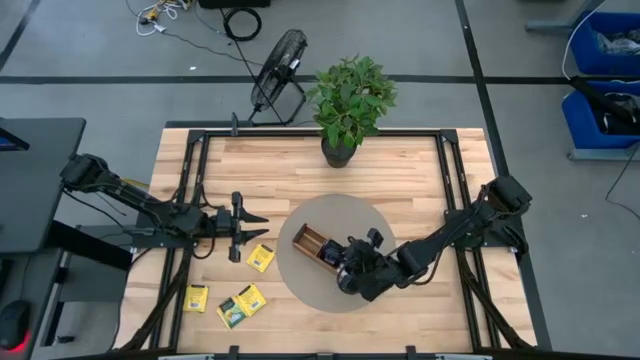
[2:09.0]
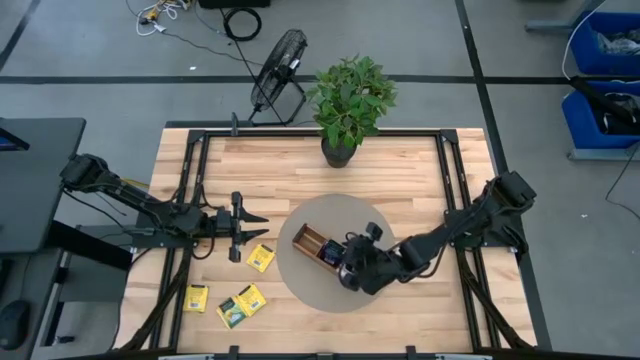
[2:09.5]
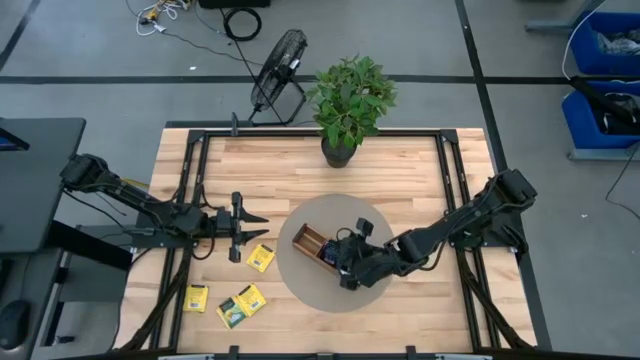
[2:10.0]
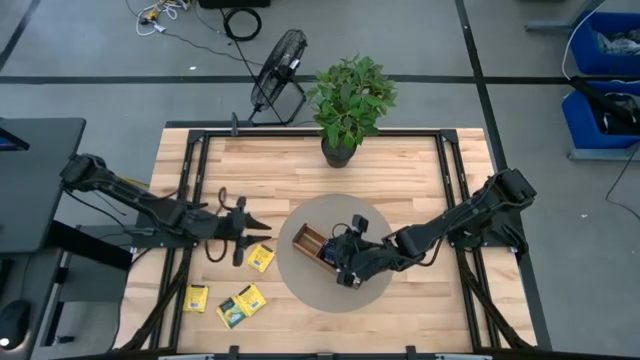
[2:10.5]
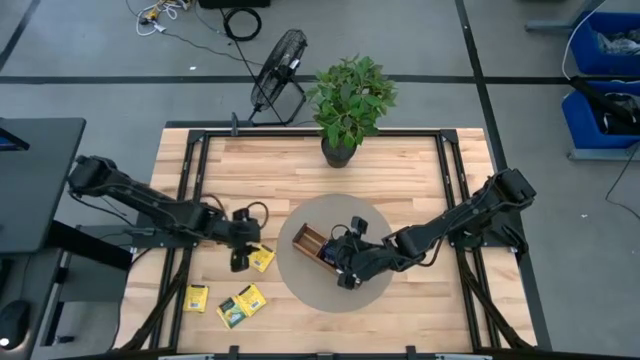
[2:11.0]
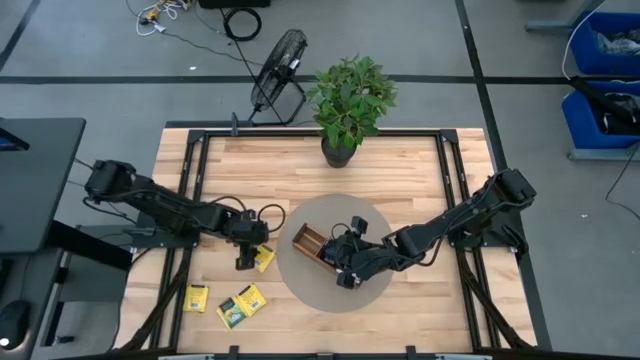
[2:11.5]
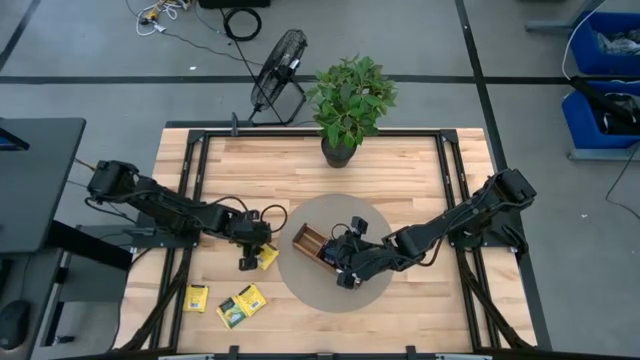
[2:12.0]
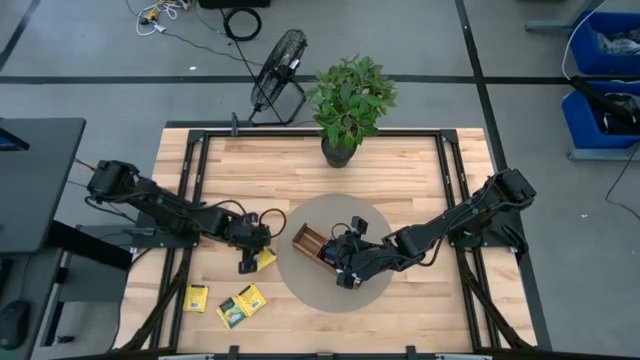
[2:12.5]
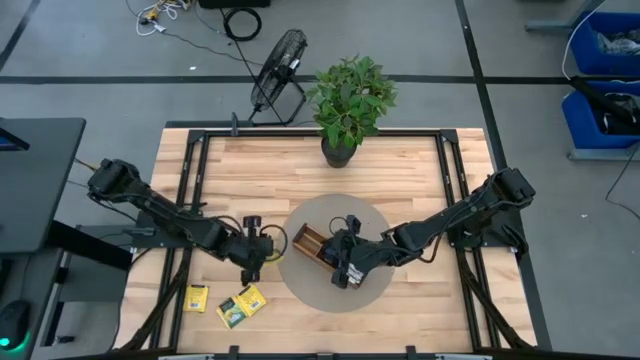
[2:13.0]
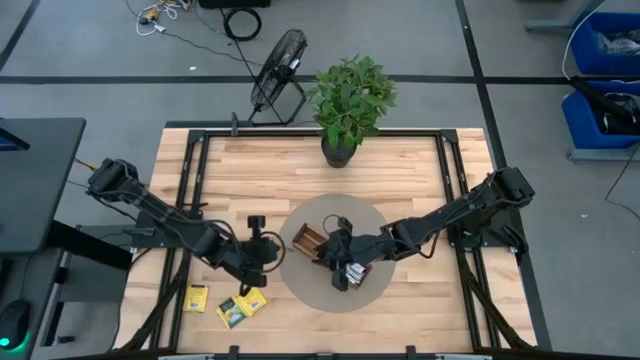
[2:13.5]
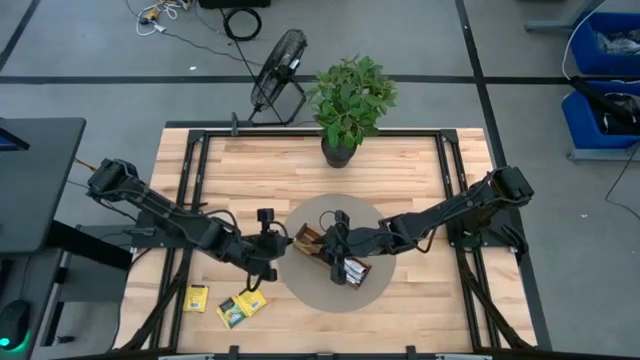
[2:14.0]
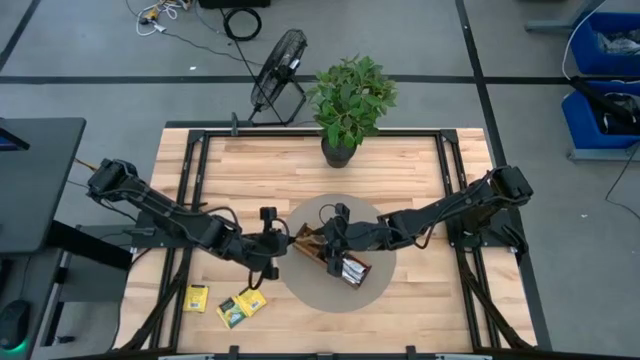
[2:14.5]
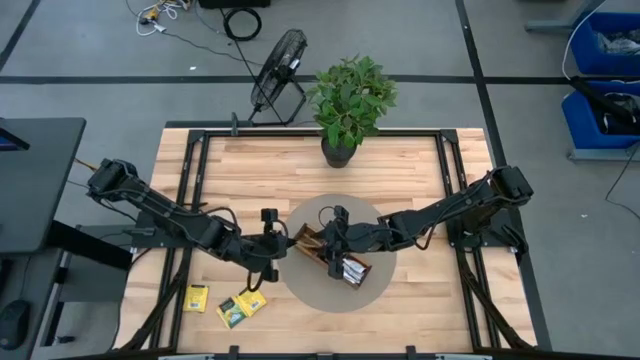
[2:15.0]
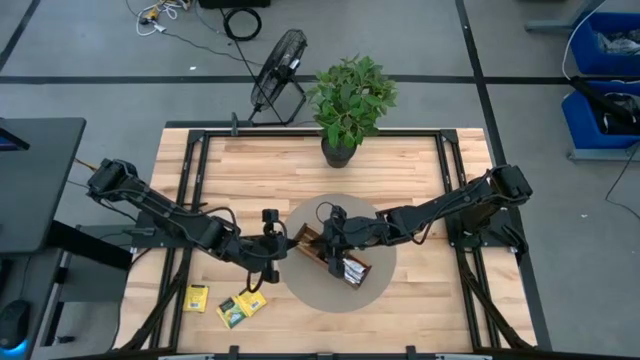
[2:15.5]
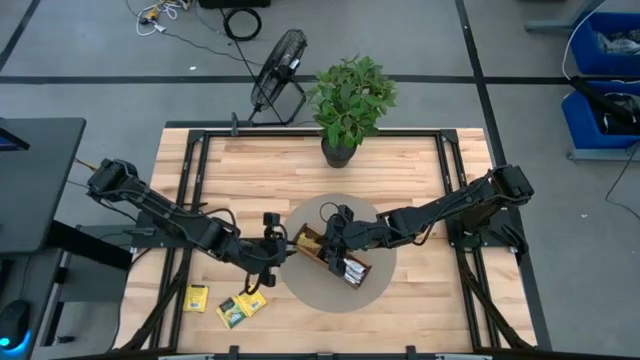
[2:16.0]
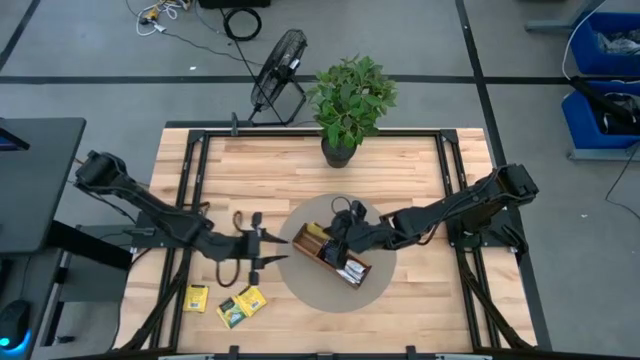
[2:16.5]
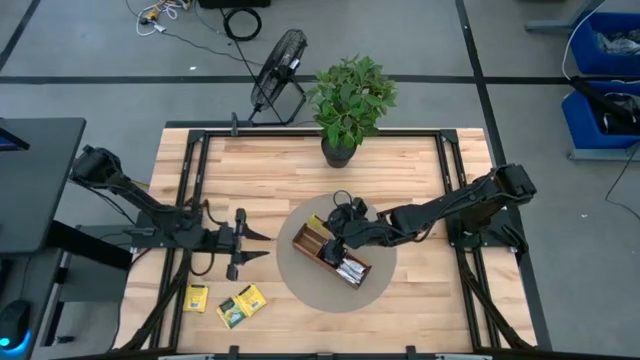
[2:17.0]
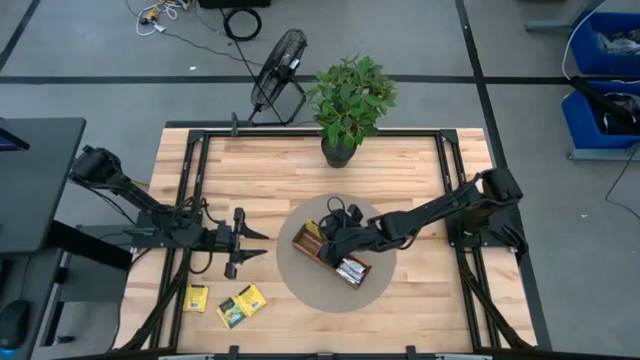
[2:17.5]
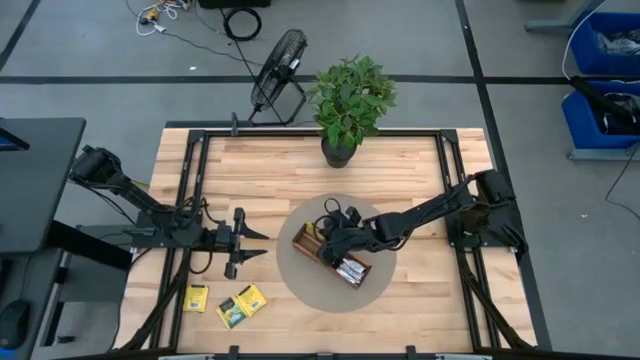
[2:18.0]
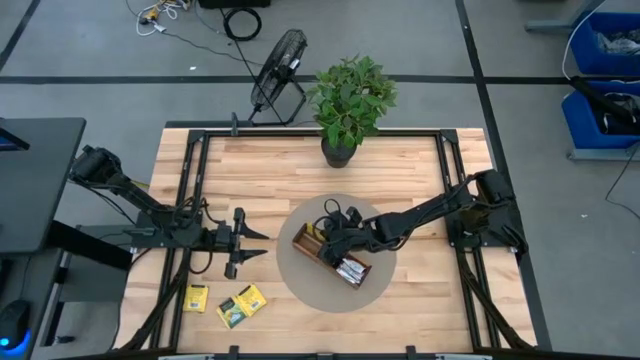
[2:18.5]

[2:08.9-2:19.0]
Task: Pick & Place Tea
Put the yellow tea bag into the top section of the wooden organizer

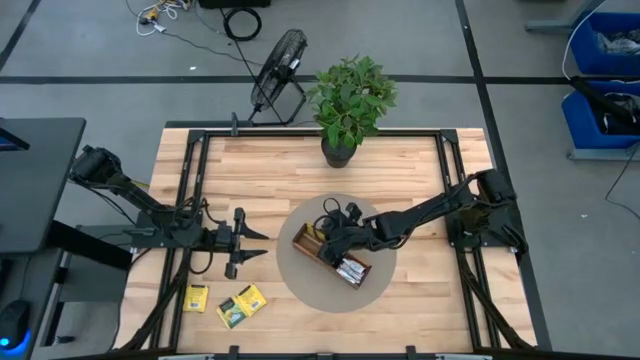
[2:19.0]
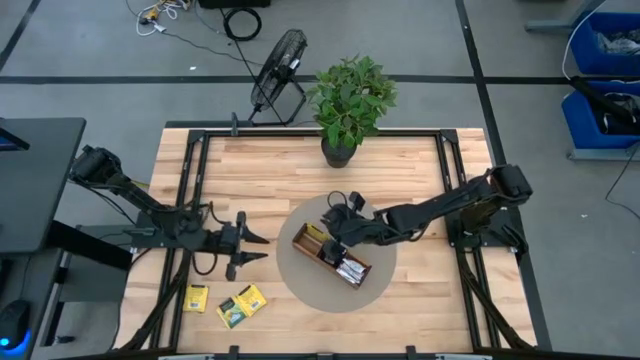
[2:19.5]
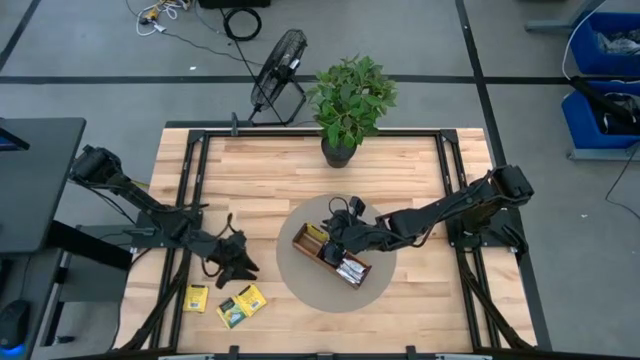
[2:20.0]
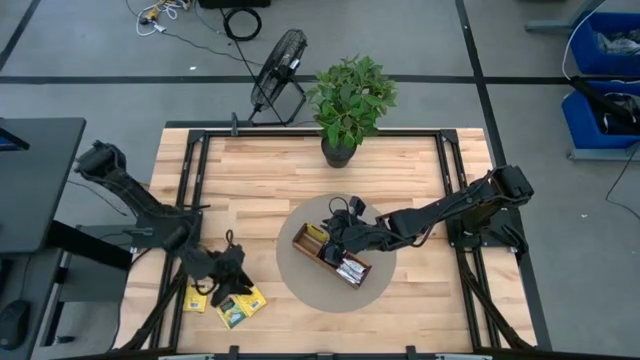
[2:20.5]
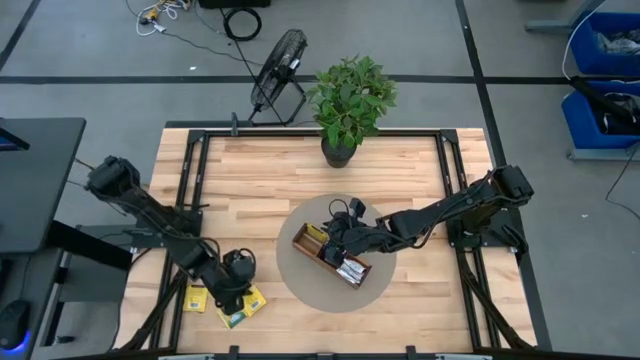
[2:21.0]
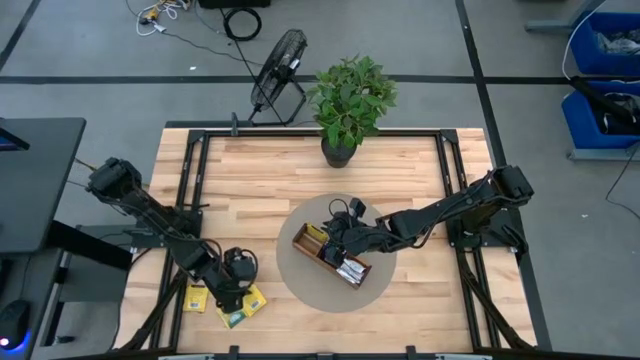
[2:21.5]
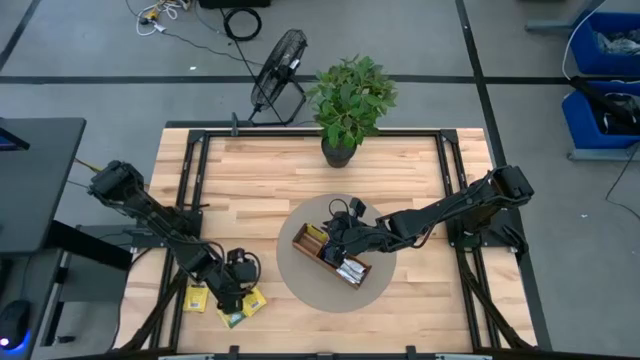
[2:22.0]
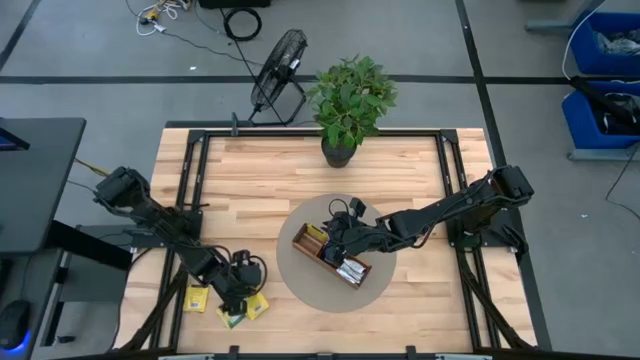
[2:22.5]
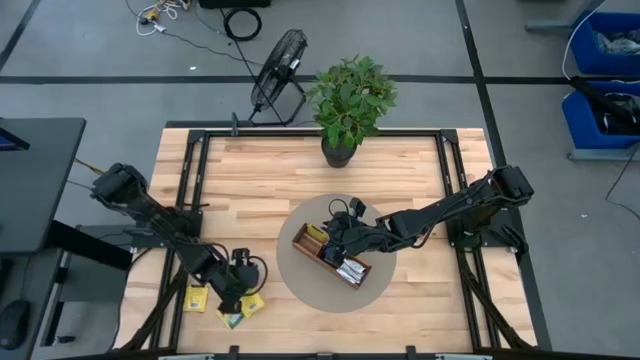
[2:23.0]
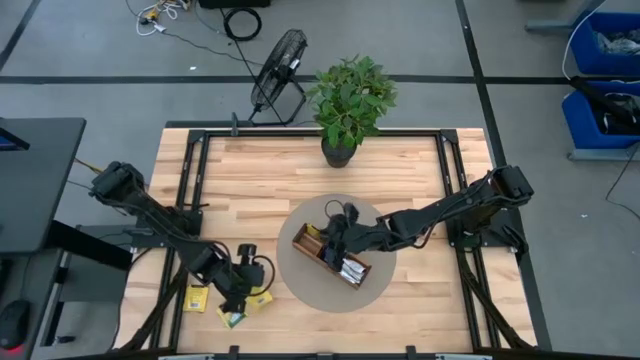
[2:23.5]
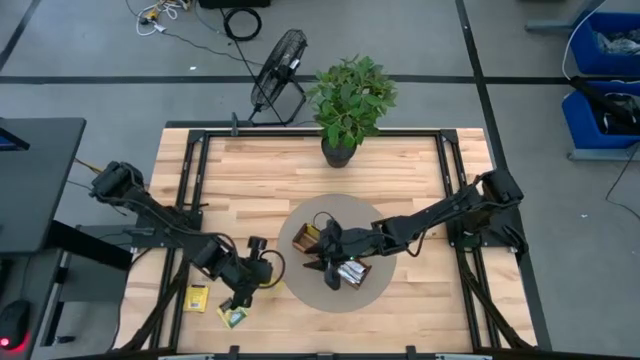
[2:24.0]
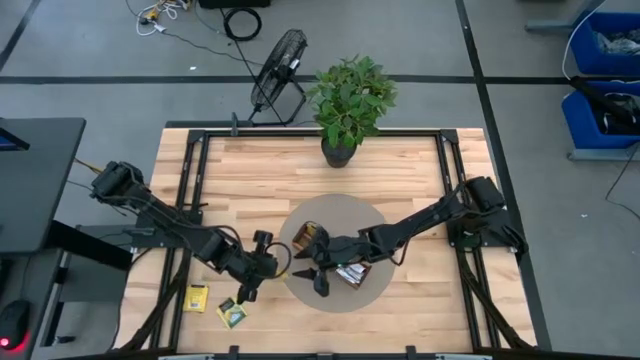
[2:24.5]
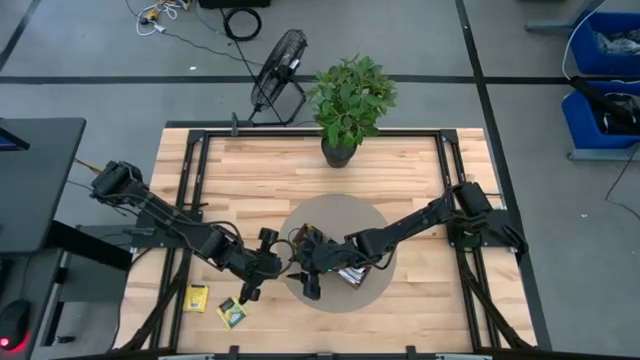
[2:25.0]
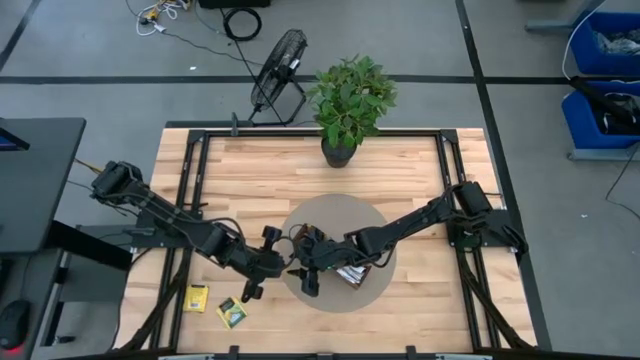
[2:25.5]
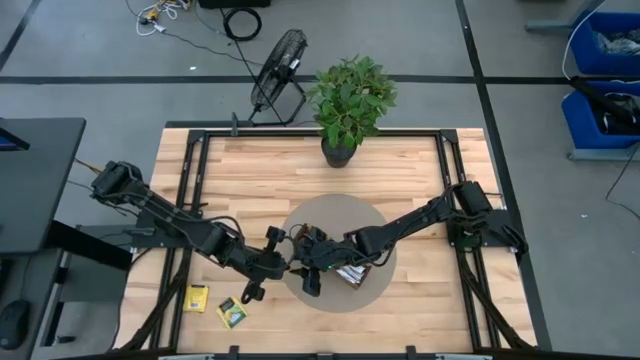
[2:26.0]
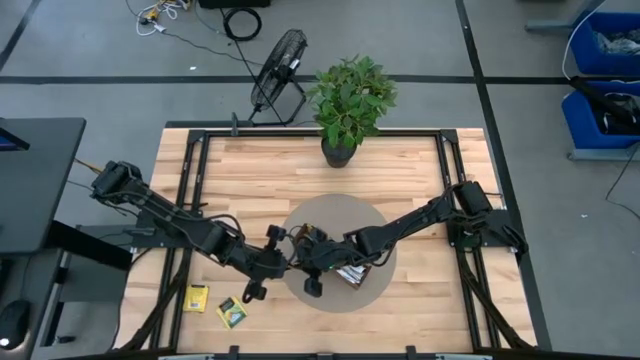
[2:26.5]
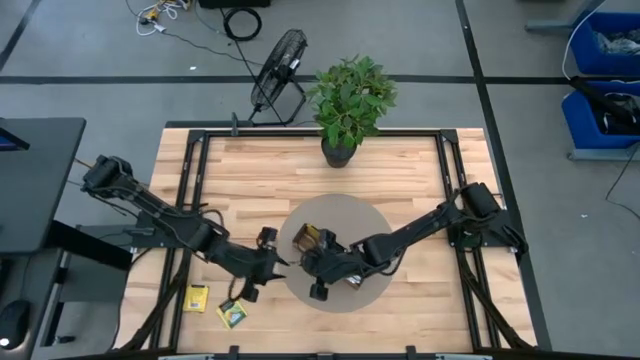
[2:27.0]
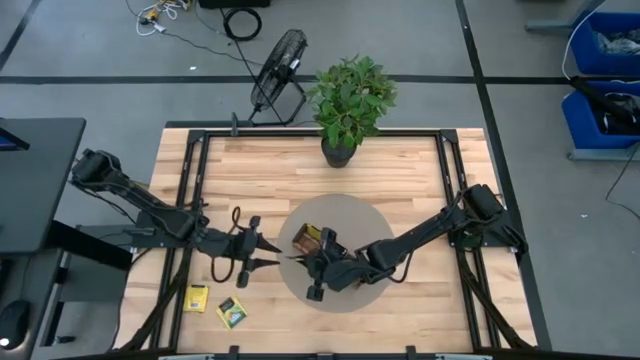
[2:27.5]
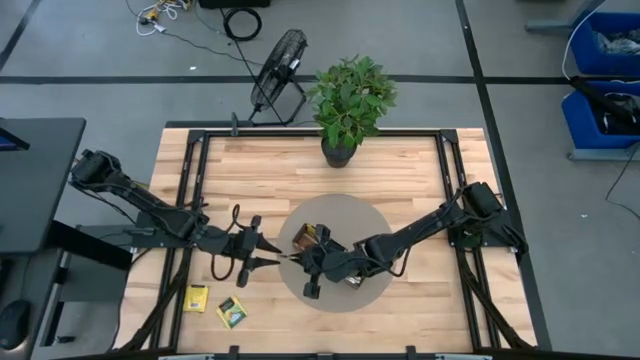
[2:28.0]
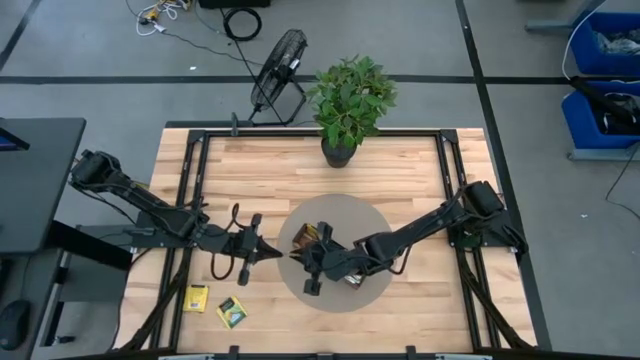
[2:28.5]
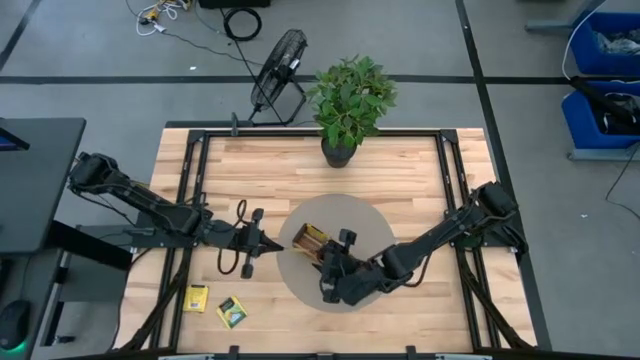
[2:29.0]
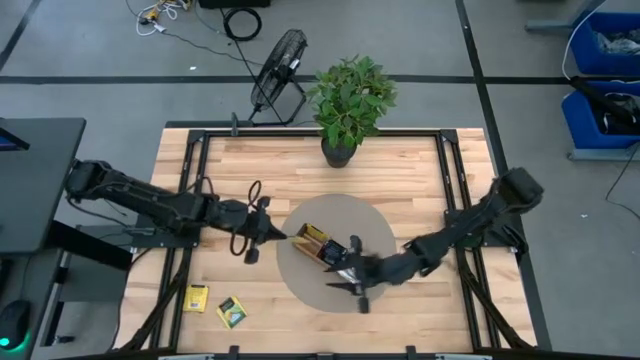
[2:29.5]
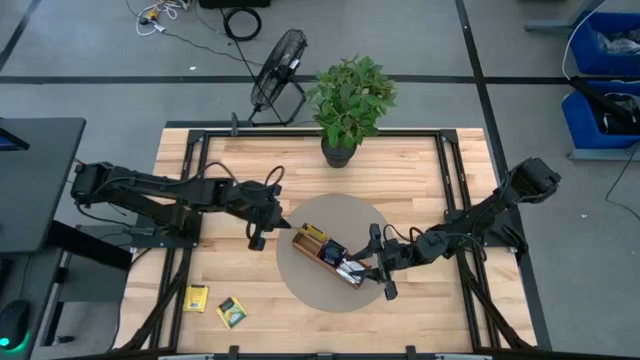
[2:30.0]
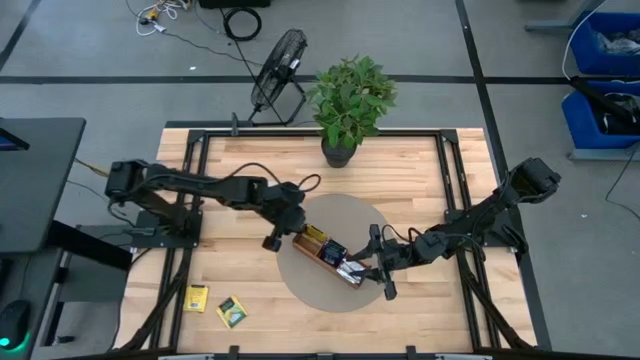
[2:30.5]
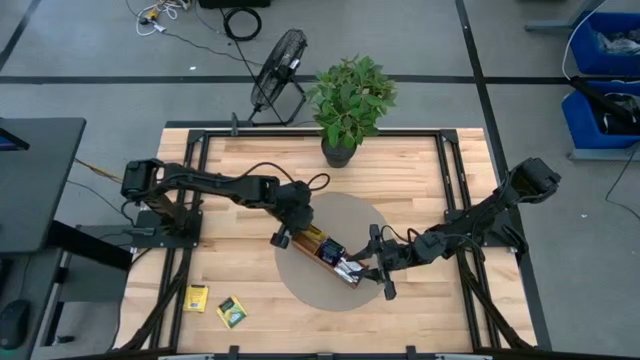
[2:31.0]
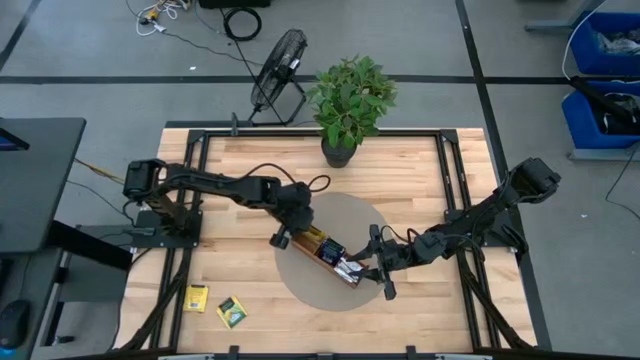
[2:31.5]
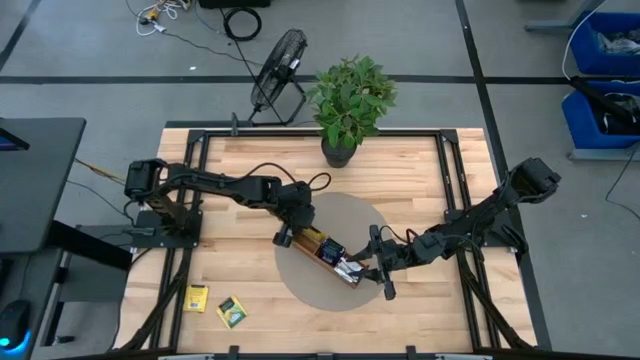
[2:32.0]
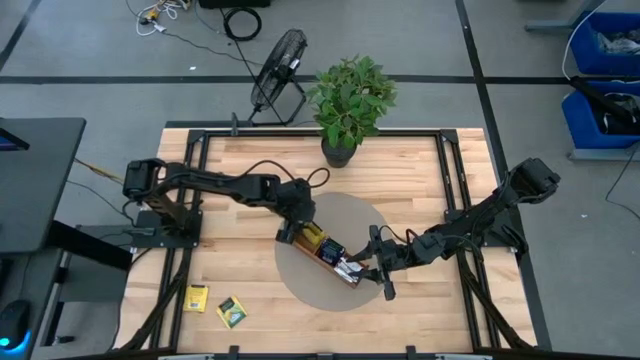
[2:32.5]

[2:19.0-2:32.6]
Put the yellow tea bag into the top section of the wooden organizer
